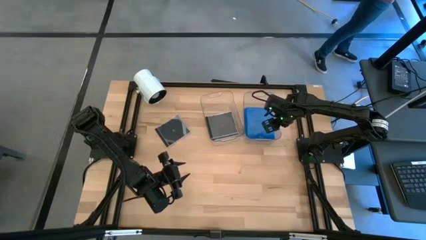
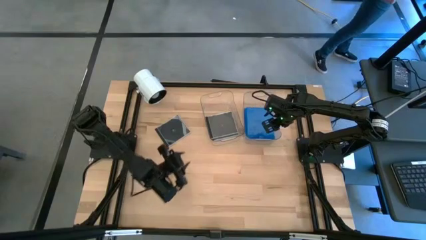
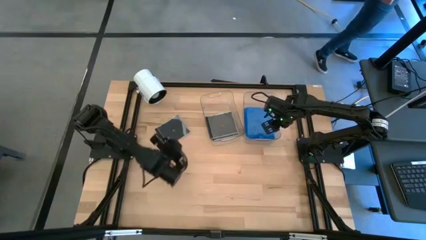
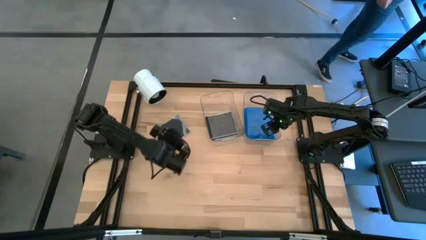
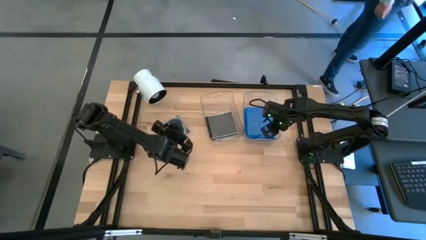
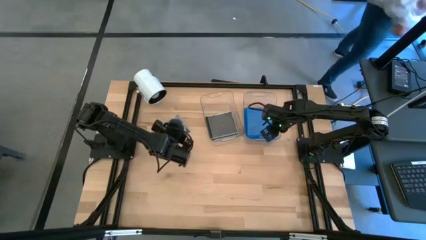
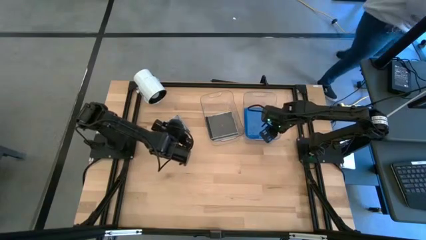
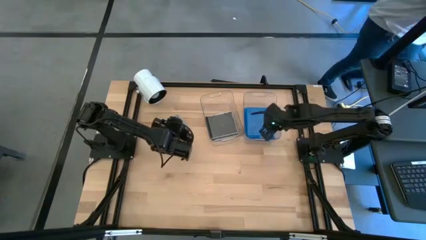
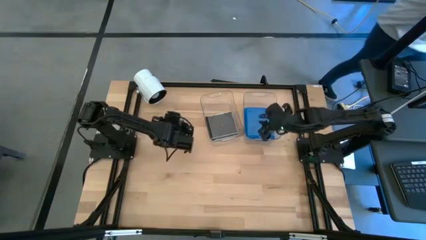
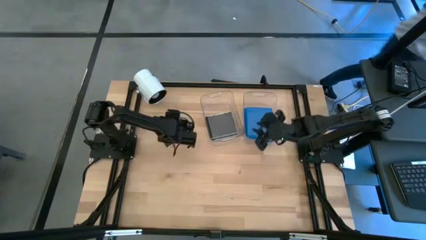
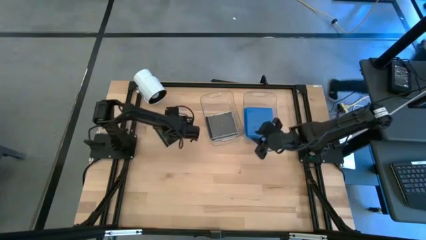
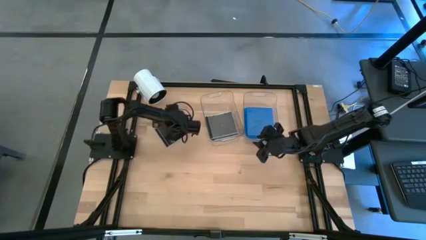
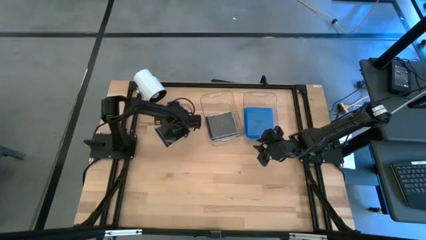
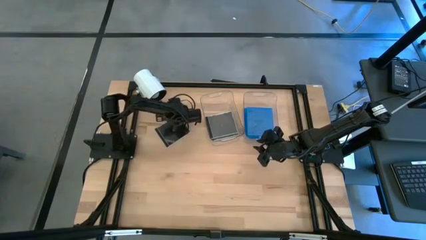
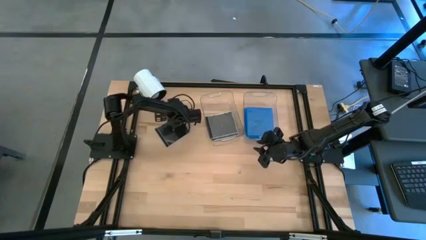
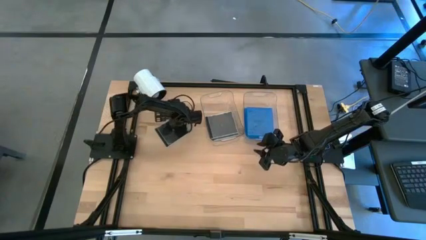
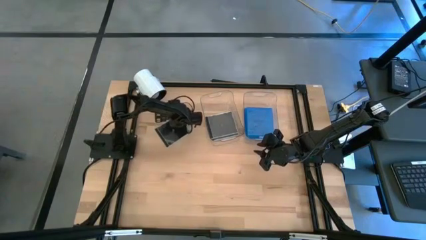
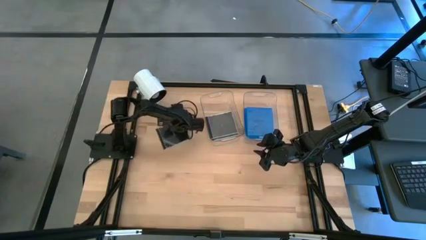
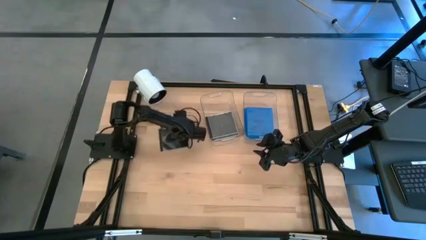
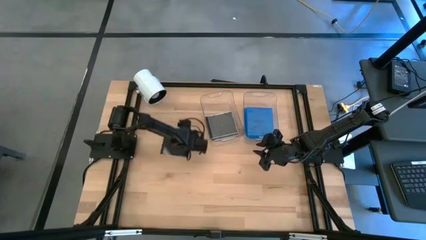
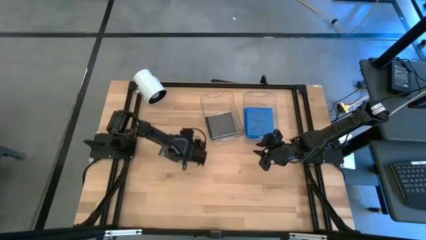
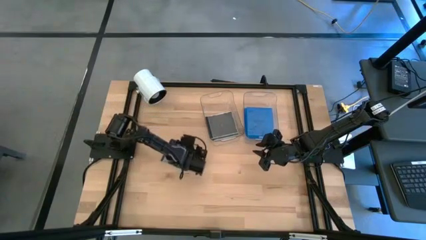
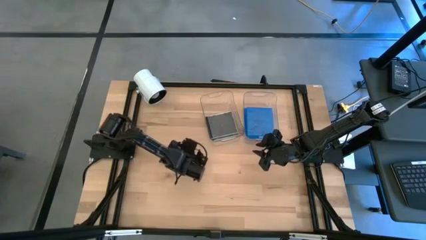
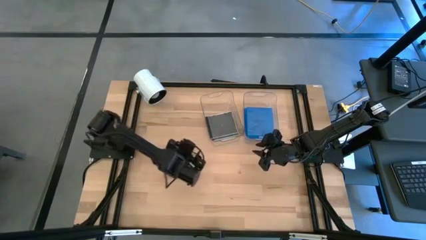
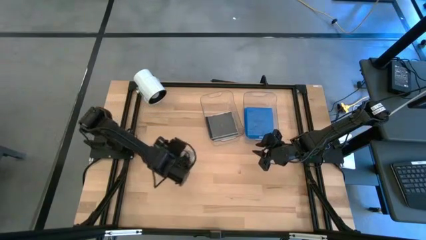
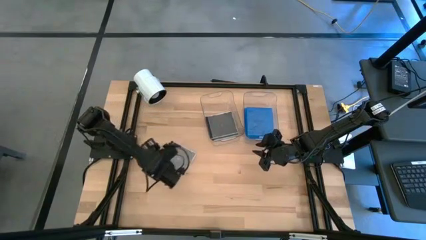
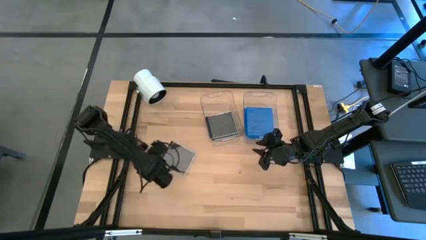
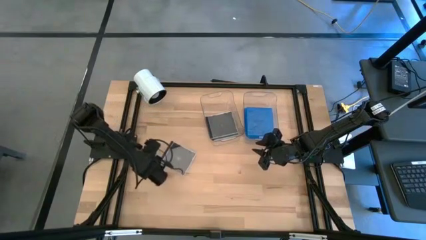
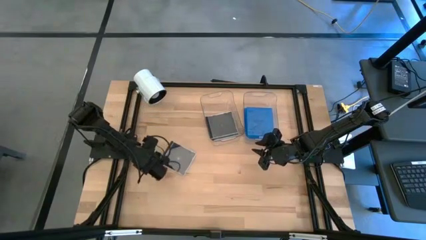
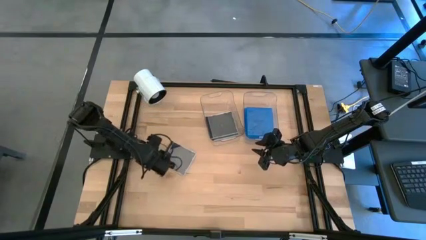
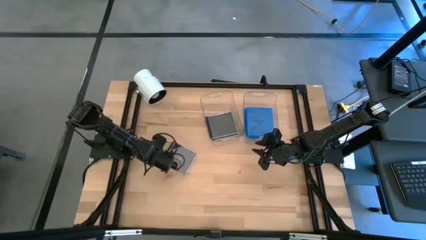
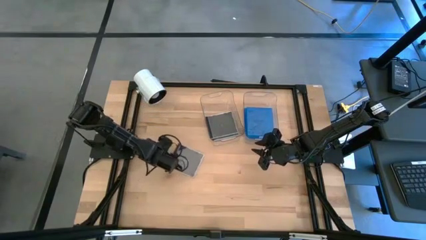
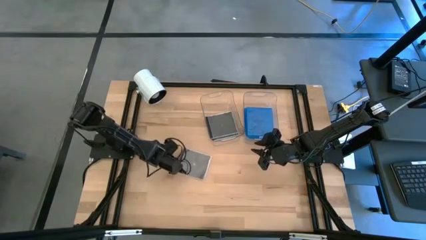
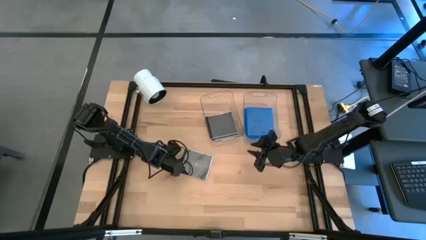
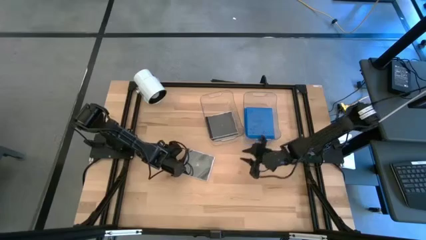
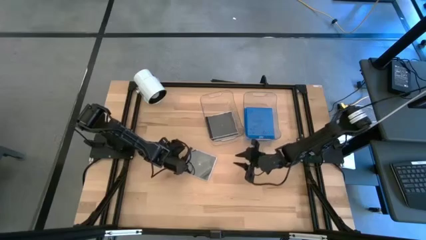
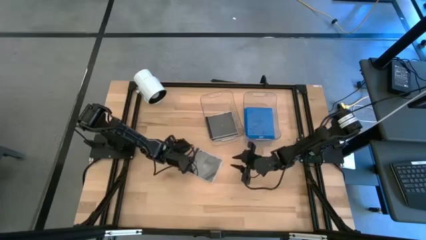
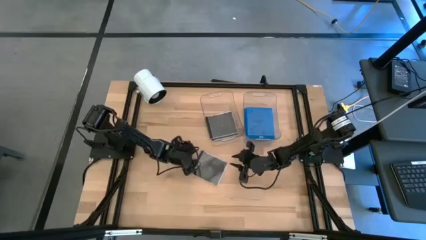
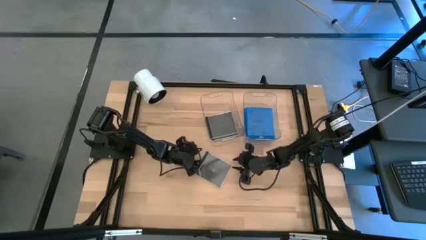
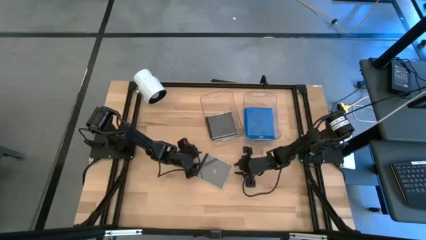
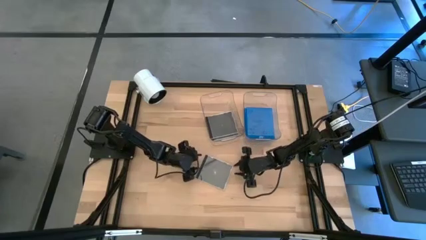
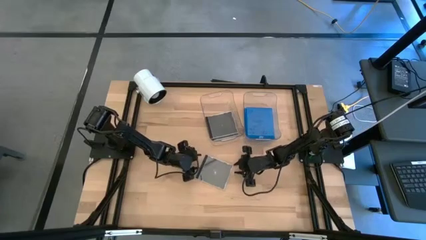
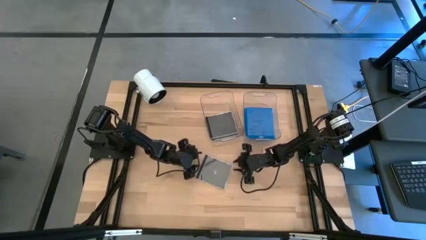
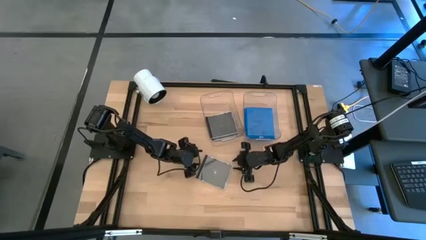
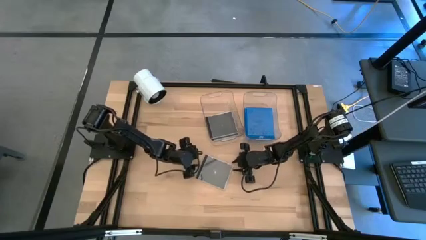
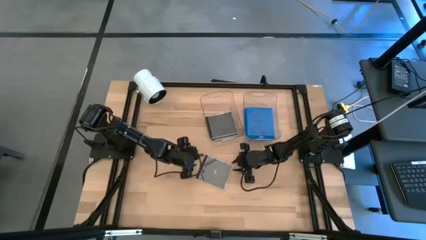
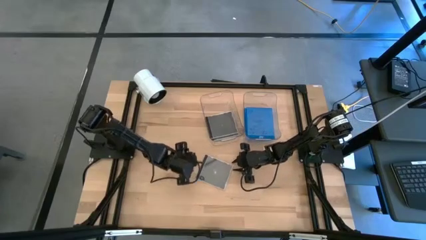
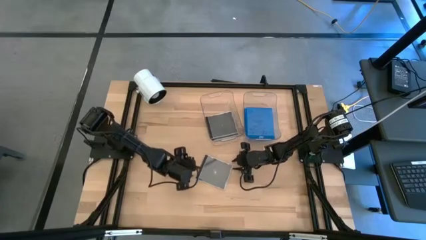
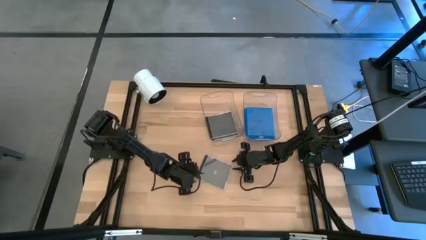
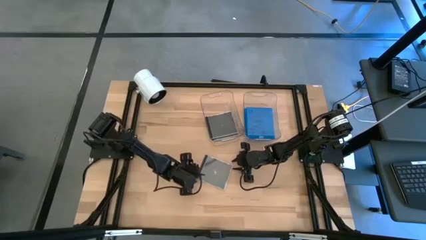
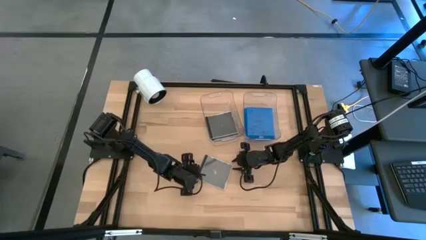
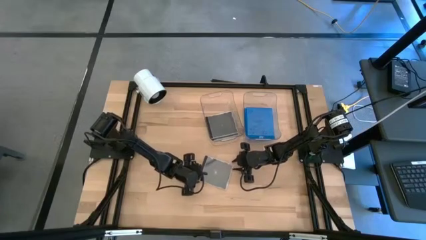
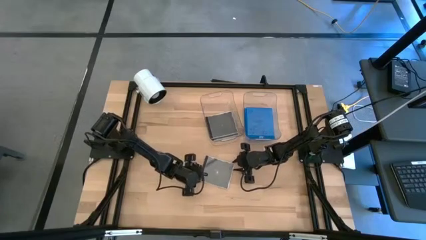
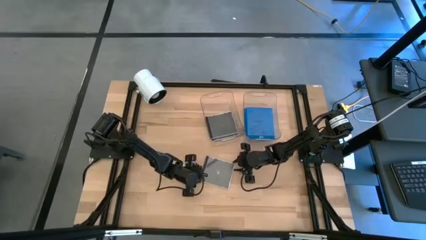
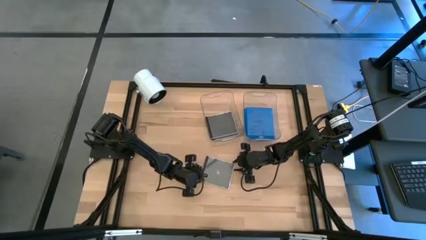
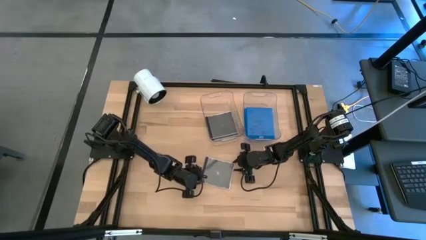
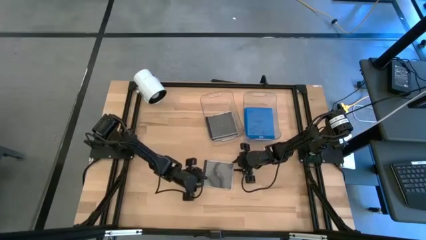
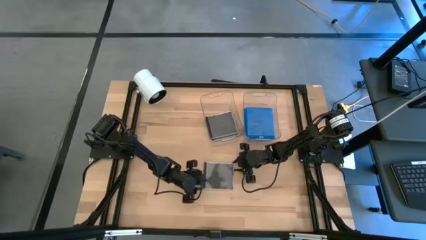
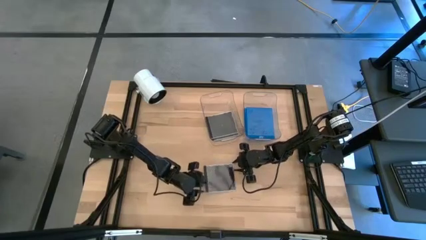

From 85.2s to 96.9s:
Task: Pick & place jewel cases by type
Put the black cd case into the left transparent bin

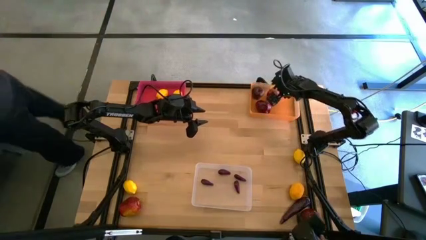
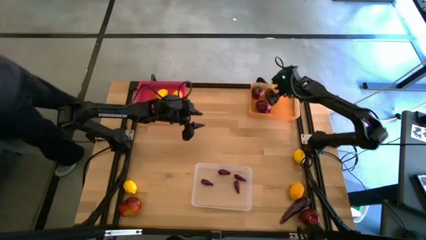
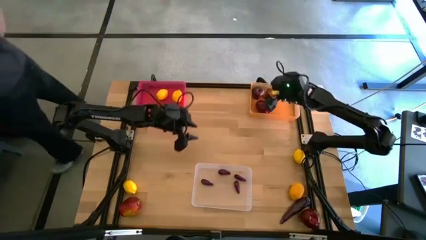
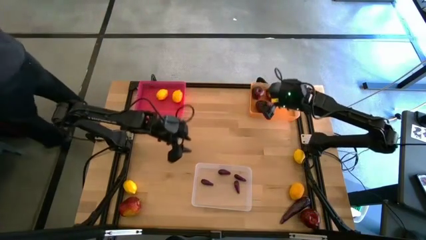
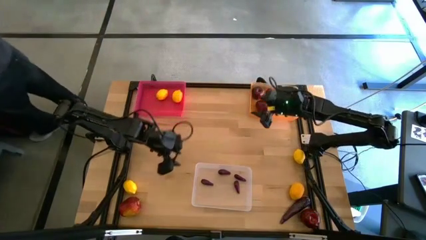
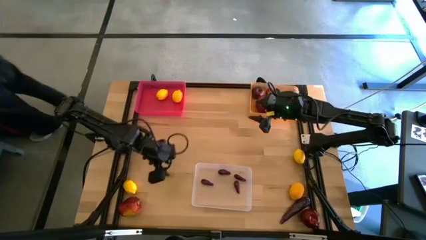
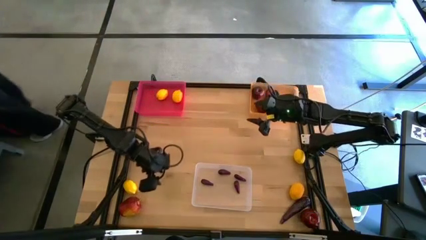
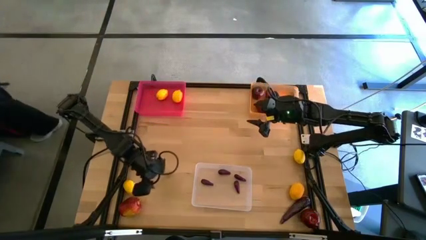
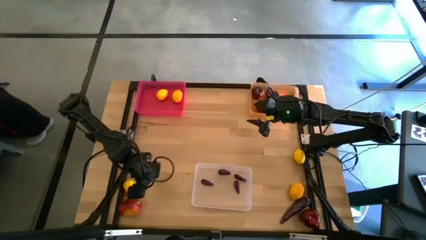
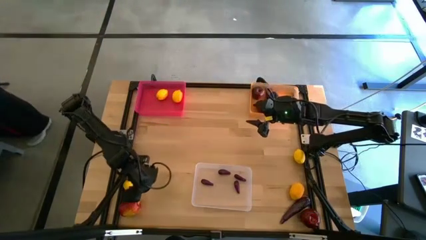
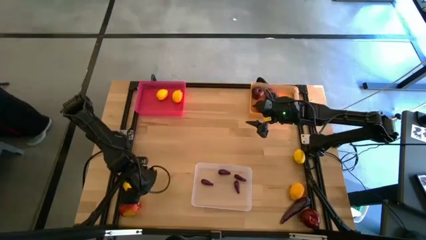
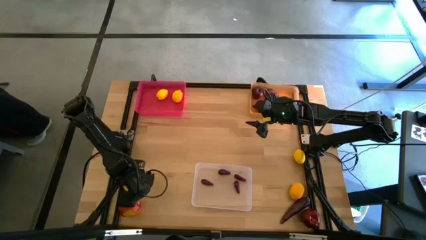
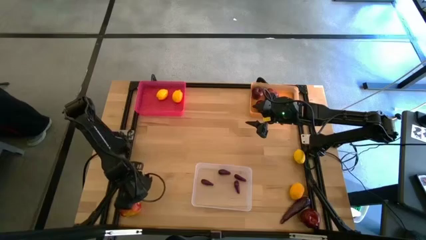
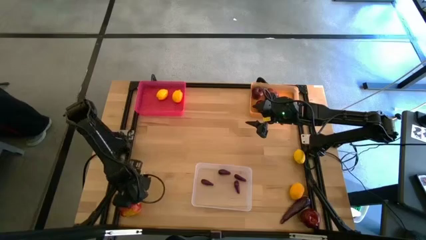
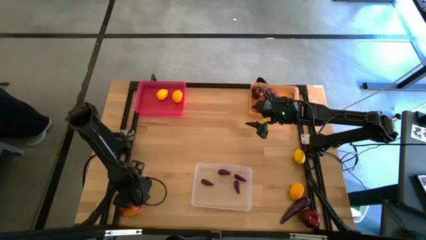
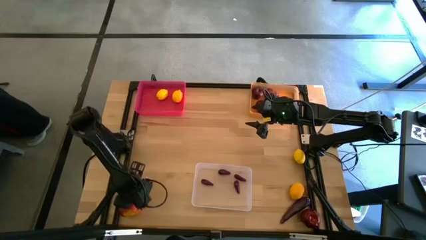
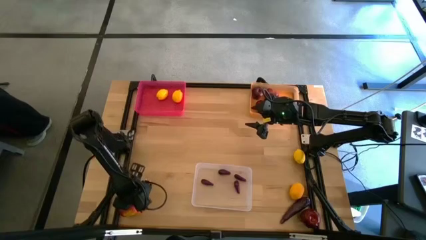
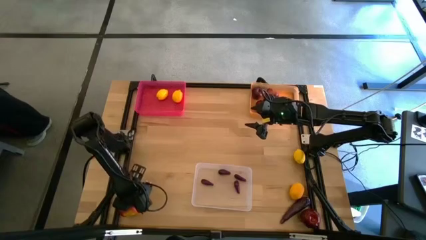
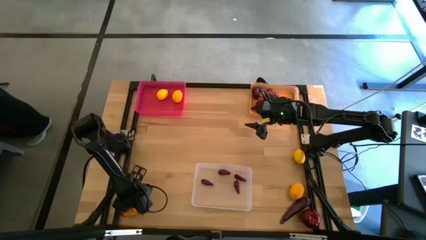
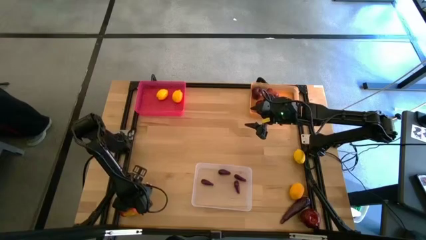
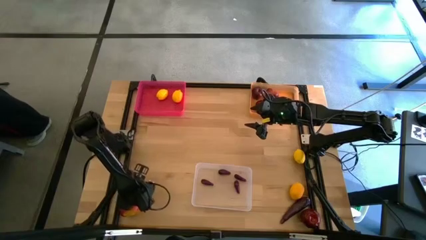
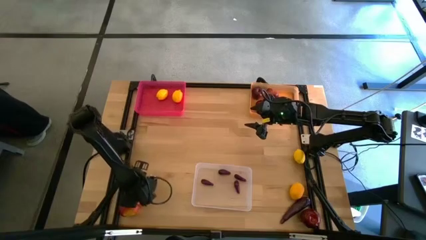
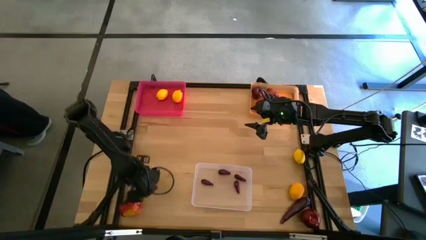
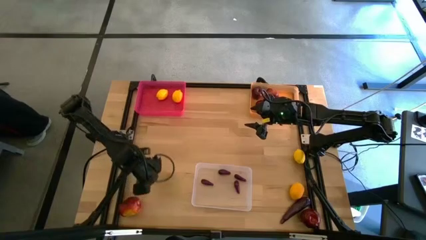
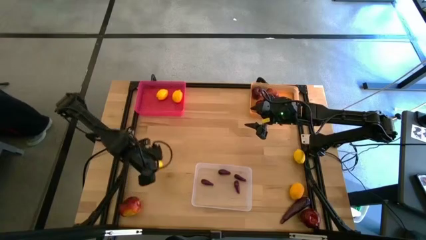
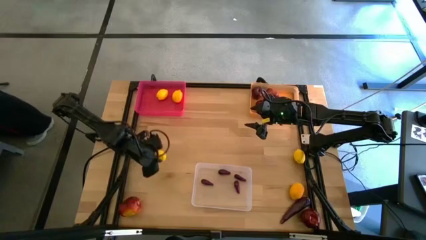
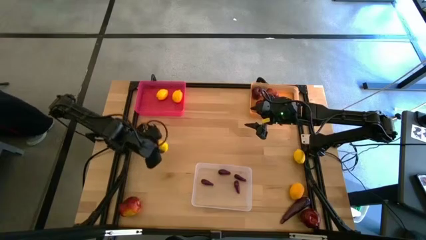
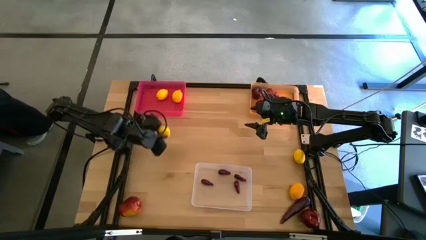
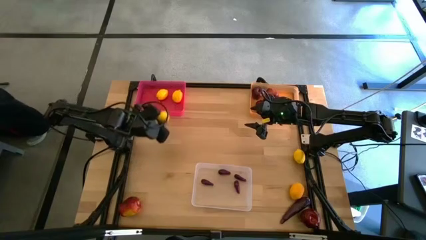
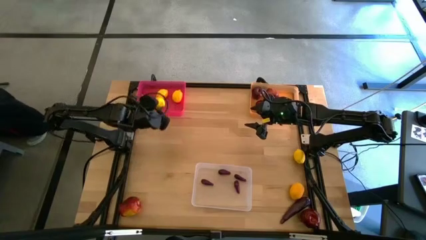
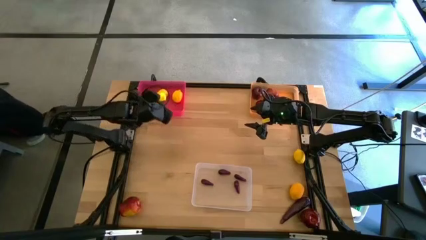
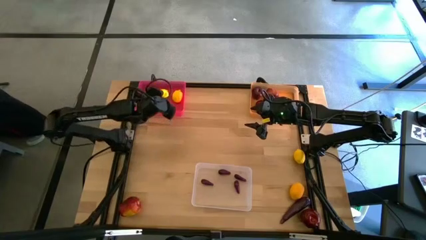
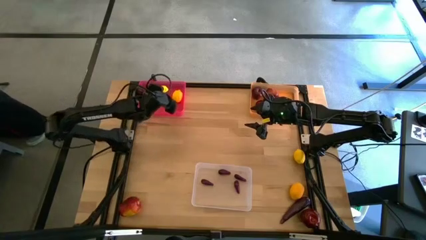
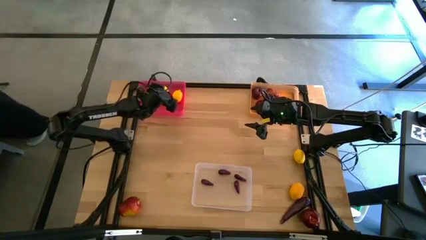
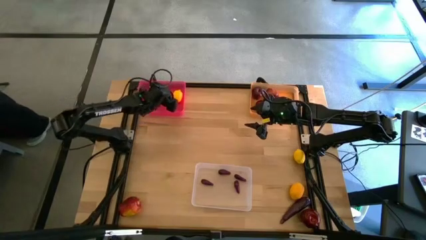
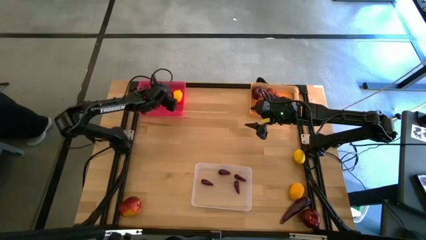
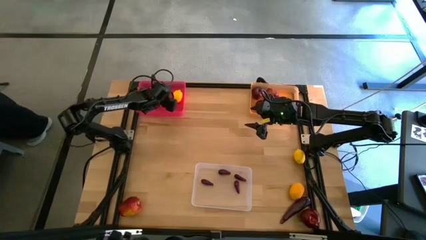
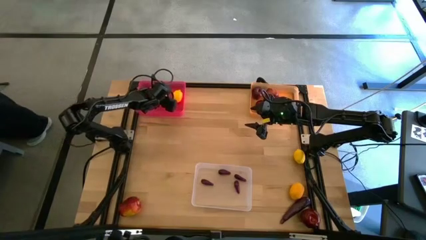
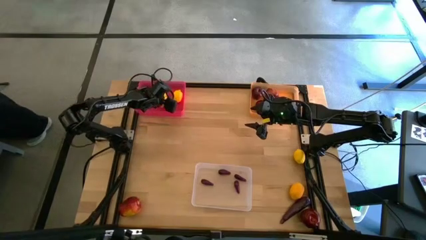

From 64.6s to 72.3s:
Task: Sort produce into baskets
Put the lemon into the red bin
